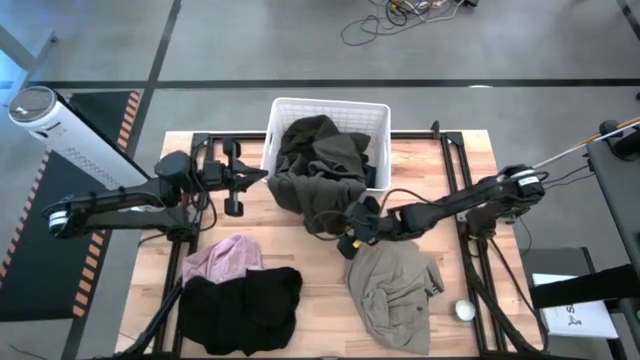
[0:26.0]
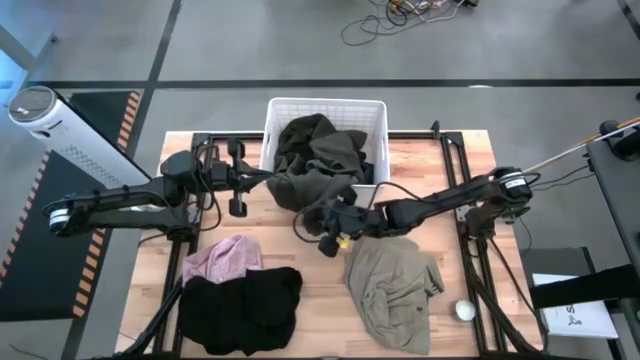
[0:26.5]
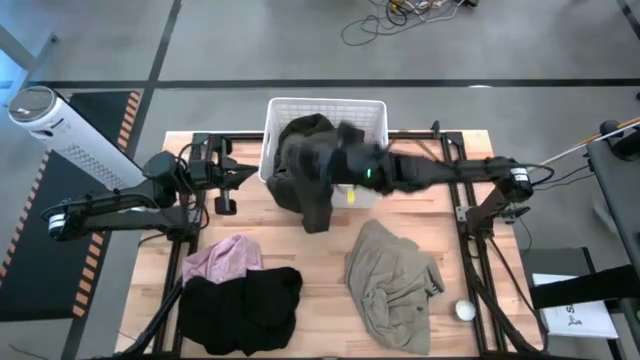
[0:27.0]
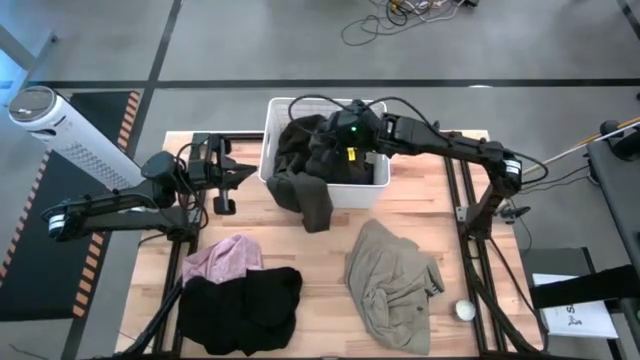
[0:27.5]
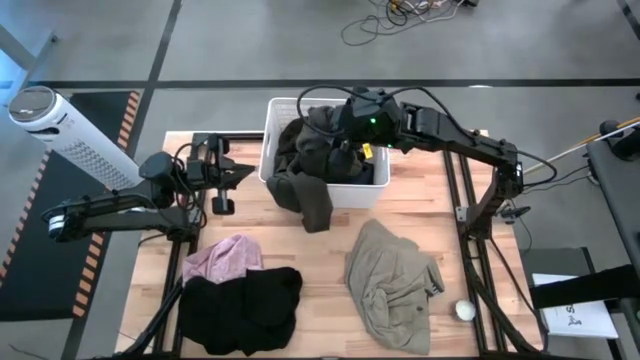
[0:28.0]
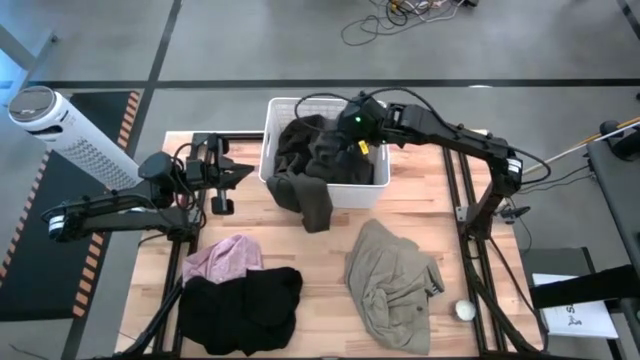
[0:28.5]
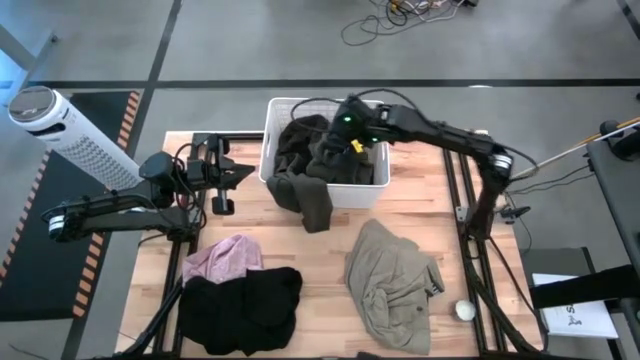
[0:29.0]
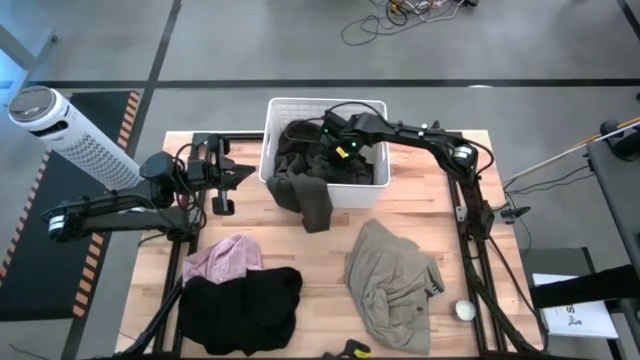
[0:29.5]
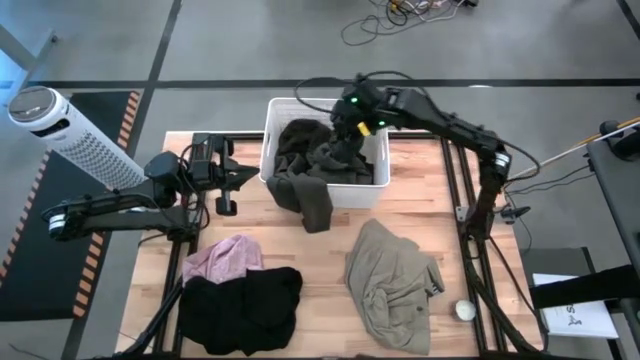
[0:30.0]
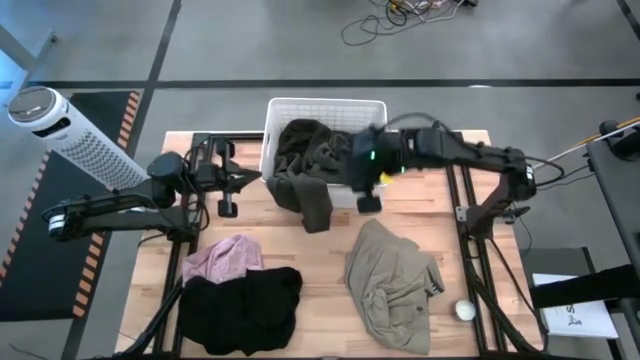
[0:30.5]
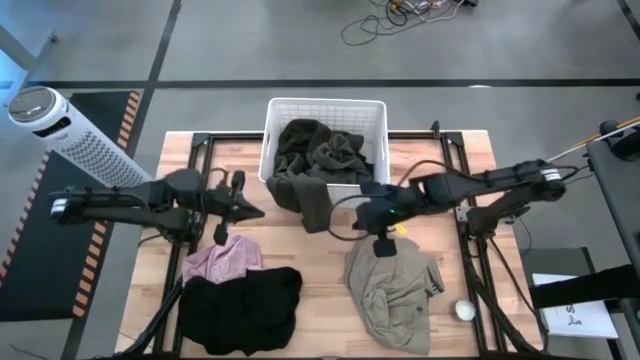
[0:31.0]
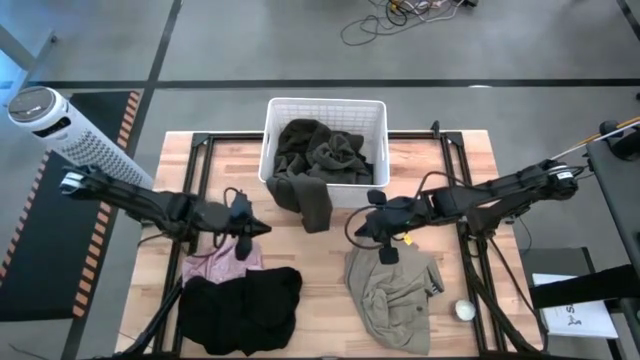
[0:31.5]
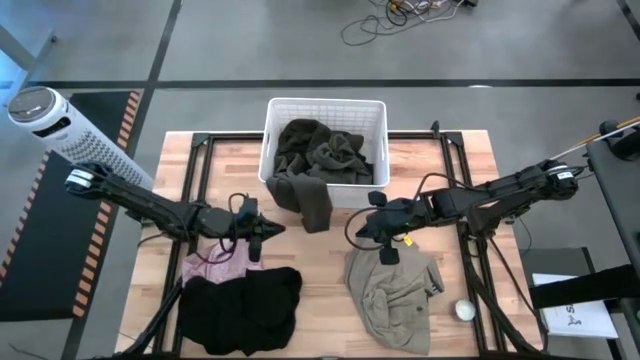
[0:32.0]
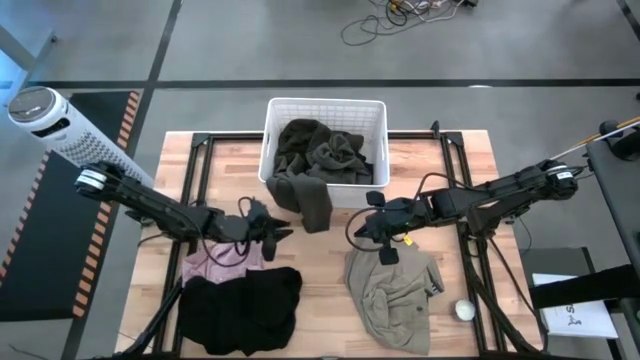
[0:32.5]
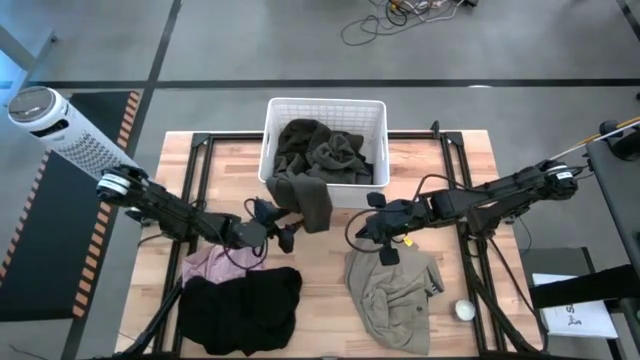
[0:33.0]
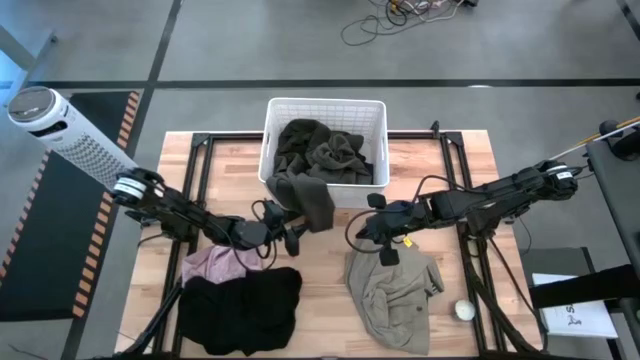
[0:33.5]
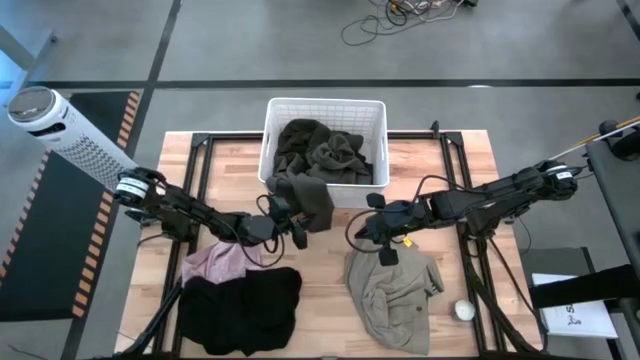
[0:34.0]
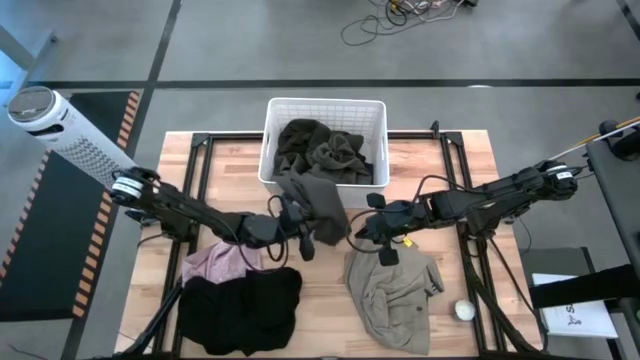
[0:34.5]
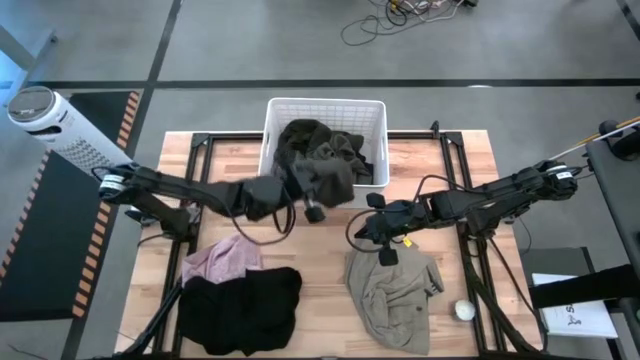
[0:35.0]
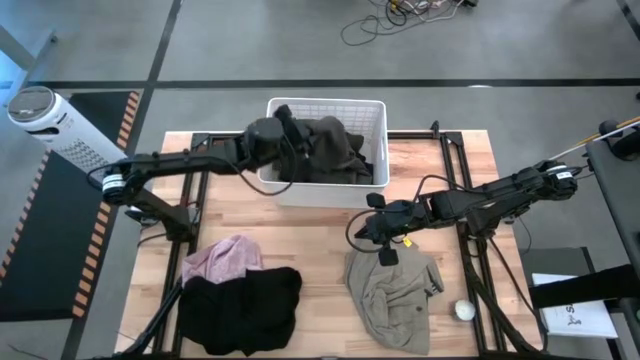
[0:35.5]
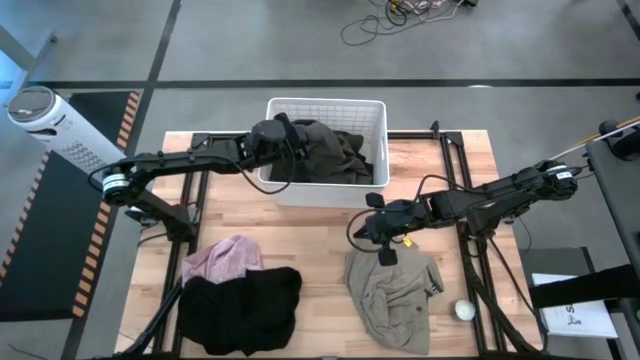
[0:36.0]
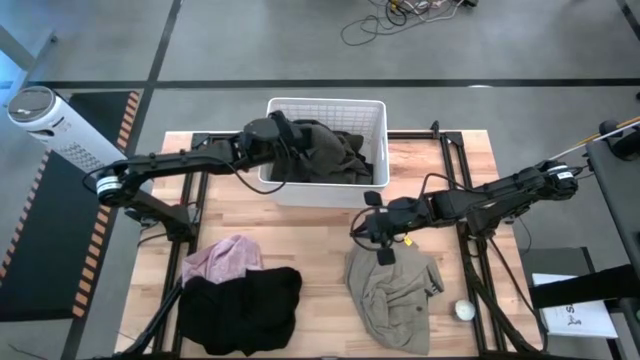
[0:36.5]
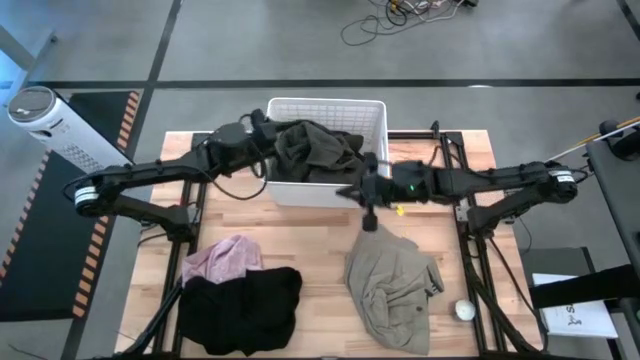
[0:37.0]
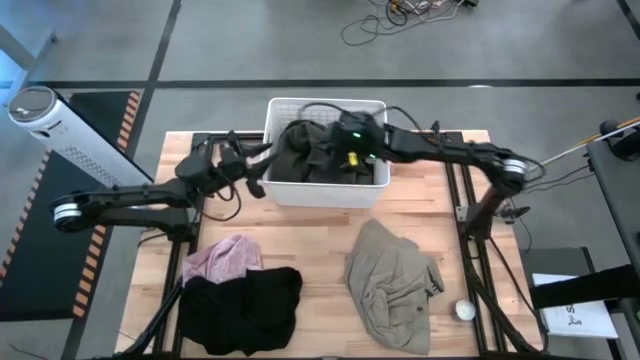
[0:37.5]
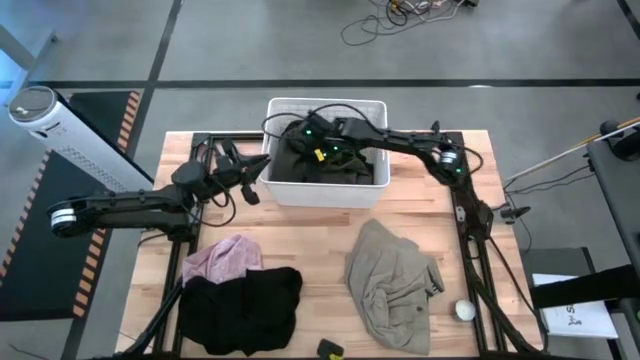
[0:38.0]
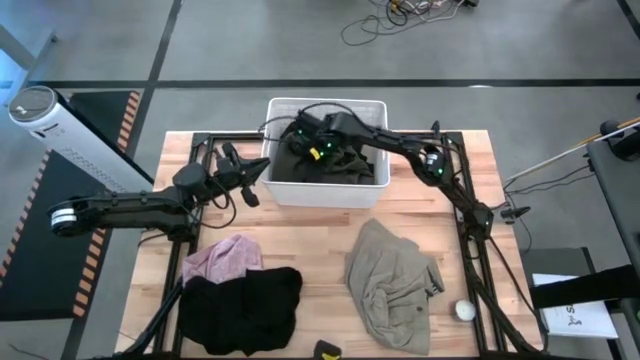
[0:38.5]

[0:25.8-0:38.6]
Task: Sort clothes
Put the hoodie jacket into the laundry bin

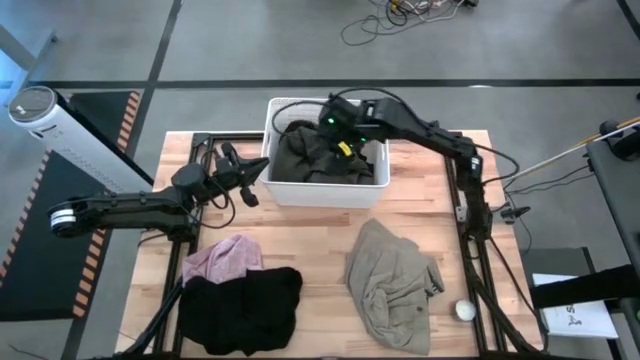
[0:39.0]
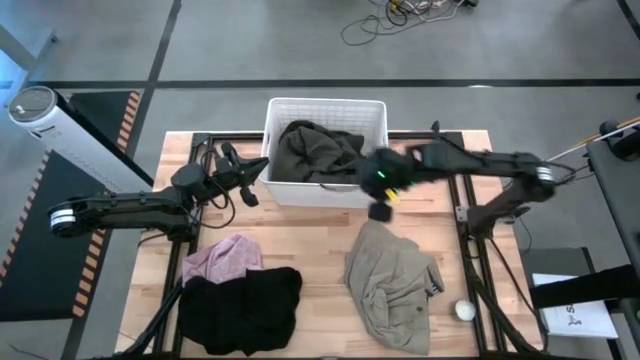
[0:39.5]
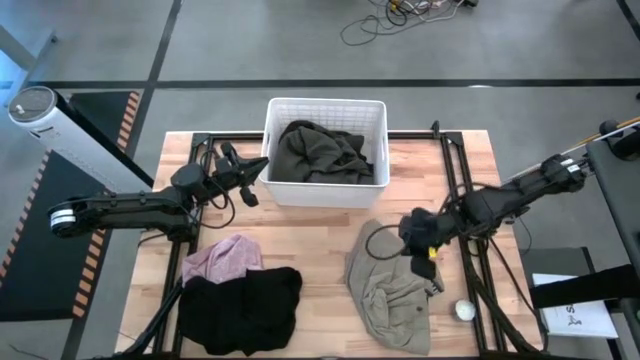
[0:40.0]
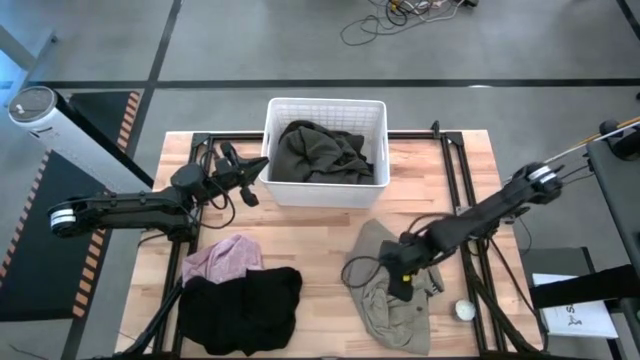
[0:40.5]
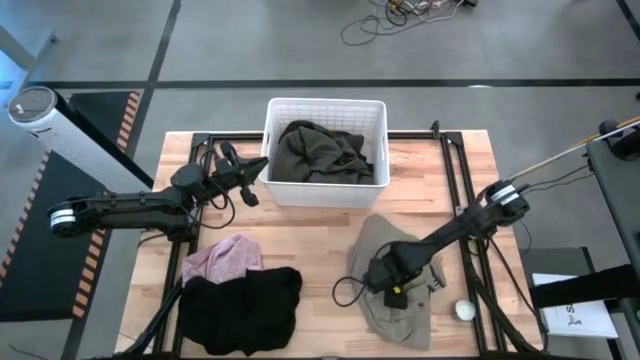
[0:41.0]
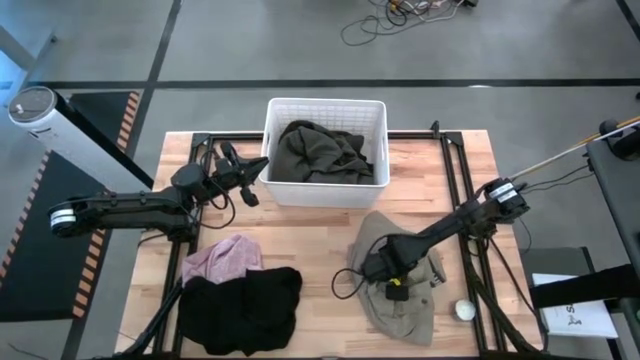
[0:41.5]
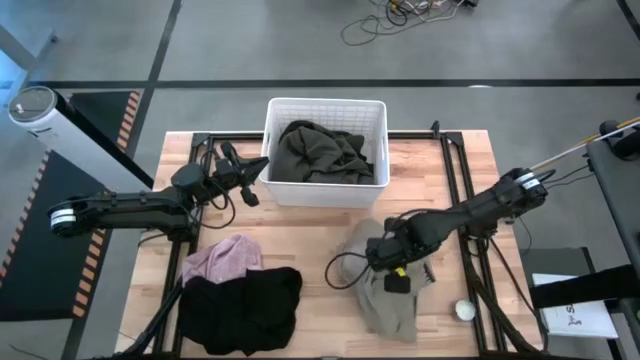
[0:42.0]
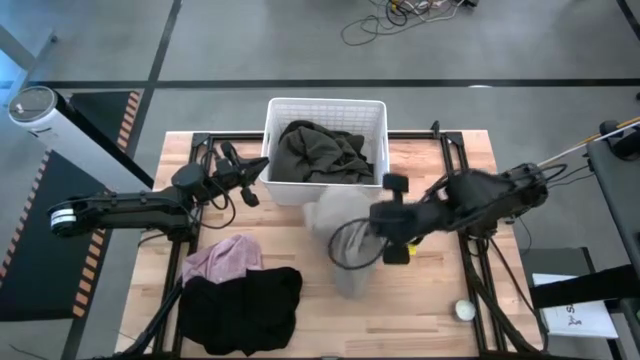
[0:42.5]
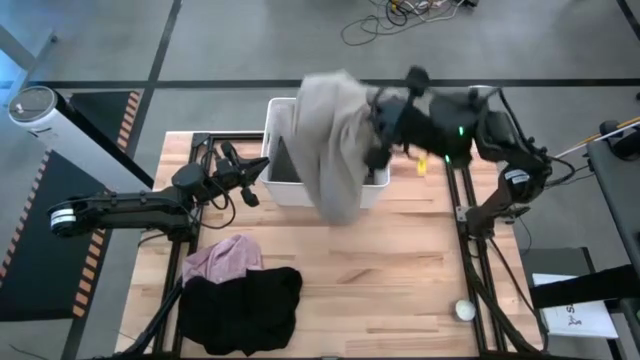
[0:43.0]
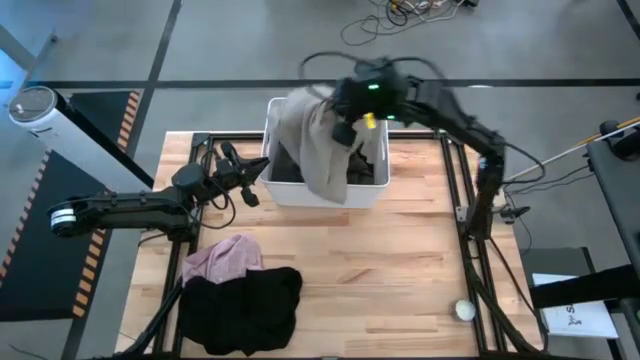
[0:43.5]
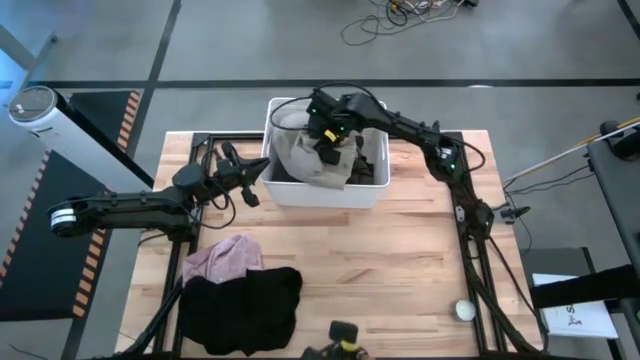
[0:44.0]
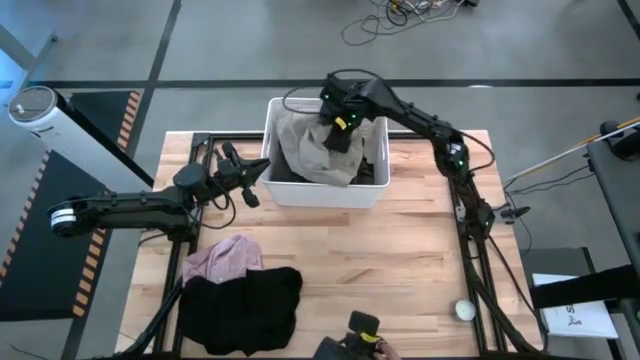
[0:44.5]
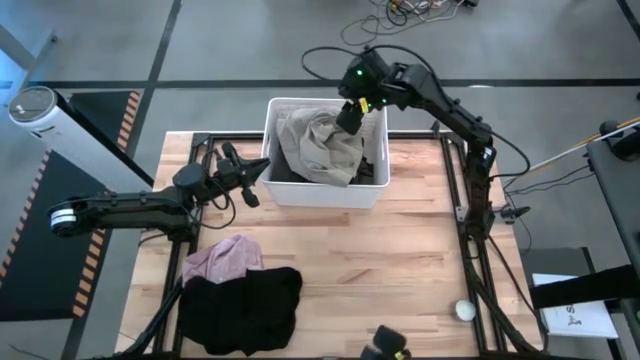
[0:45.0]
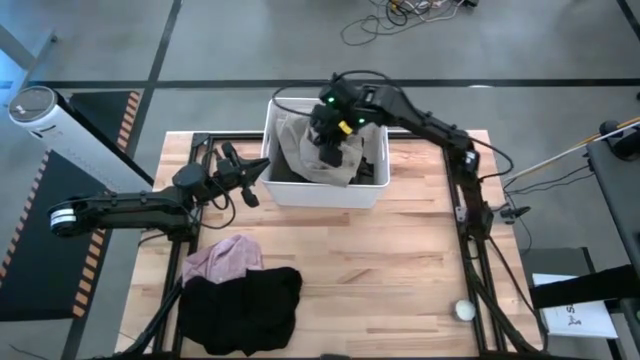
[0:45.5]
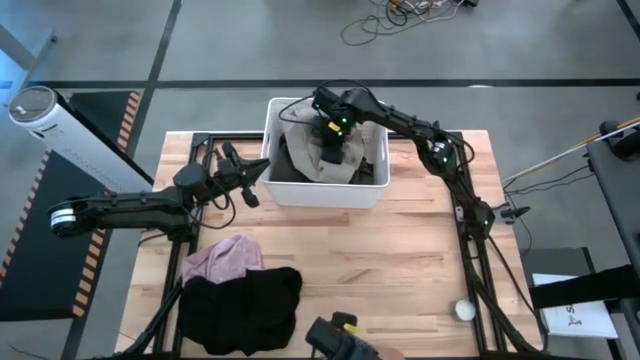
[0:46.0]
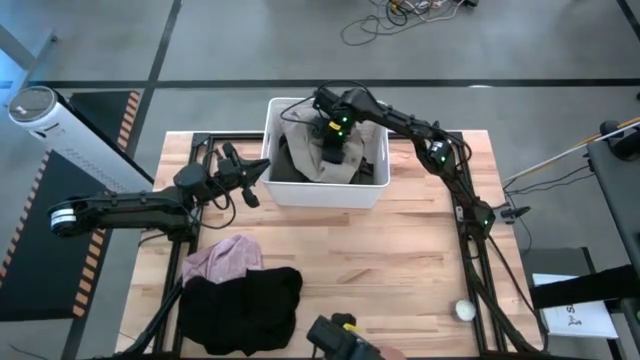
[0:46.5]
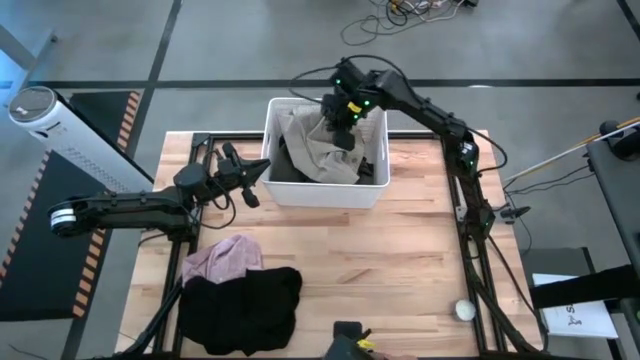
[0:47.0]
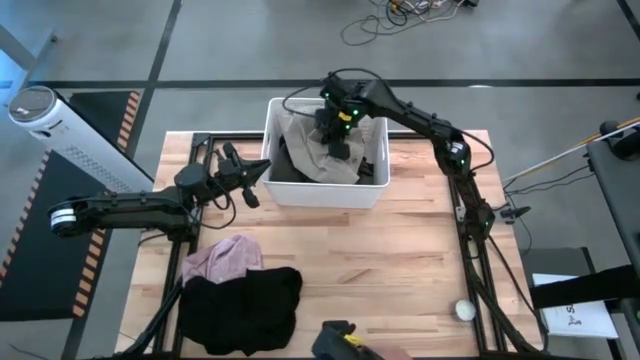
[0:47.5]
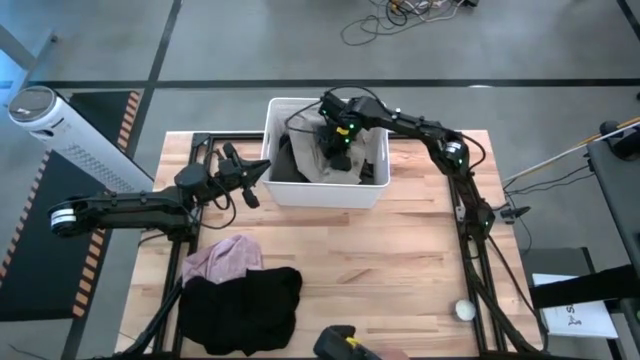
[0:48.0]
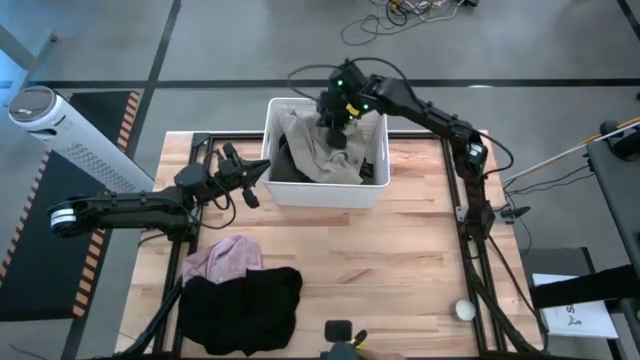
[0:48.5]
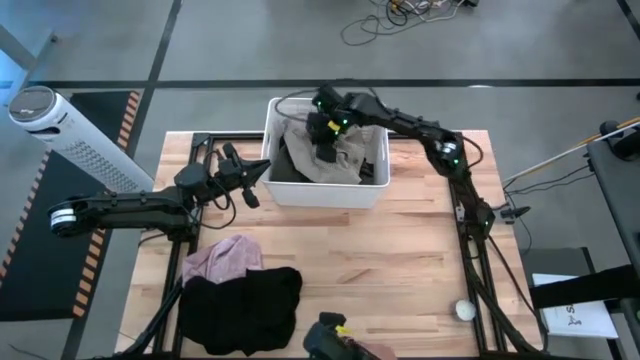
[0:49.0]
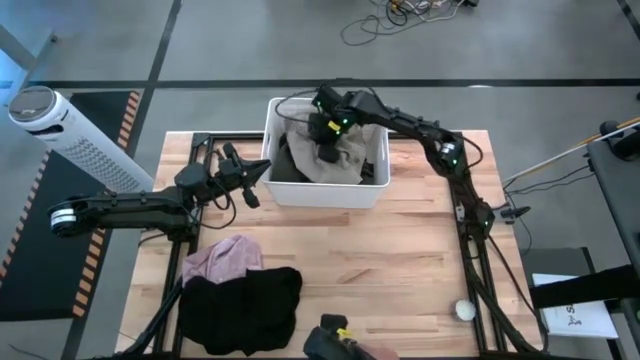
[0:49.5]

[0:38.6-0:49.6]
Put the grey trousers into the laundry bin
